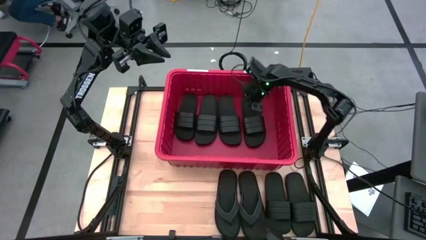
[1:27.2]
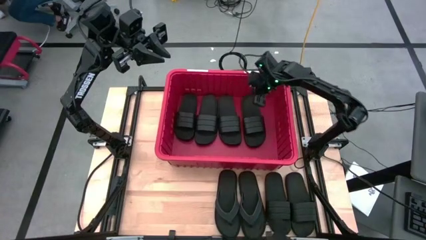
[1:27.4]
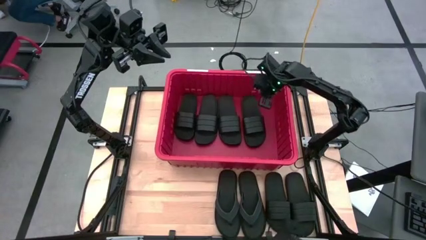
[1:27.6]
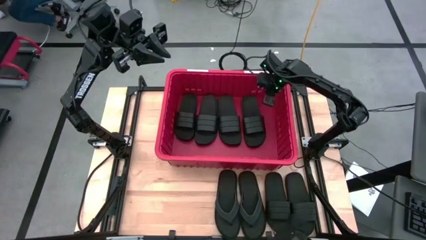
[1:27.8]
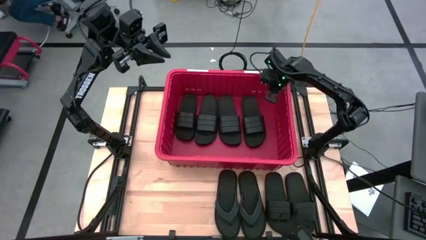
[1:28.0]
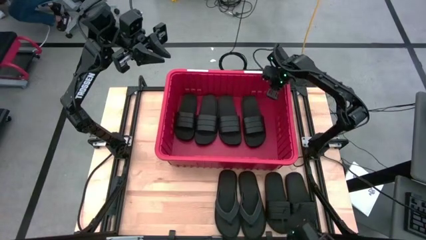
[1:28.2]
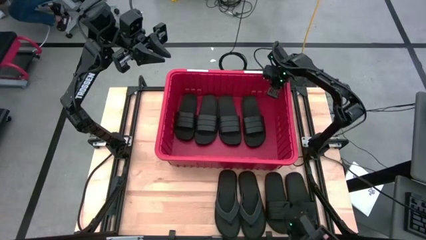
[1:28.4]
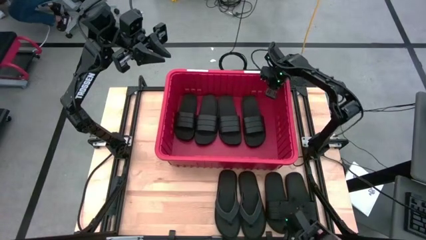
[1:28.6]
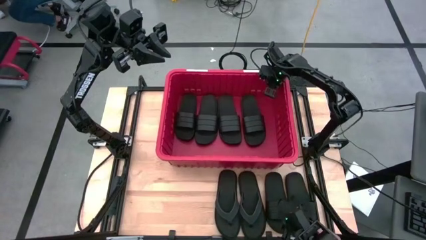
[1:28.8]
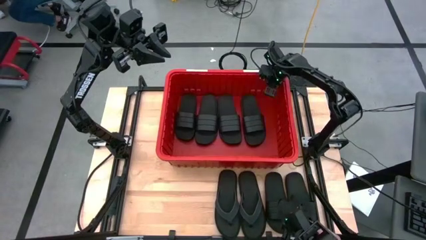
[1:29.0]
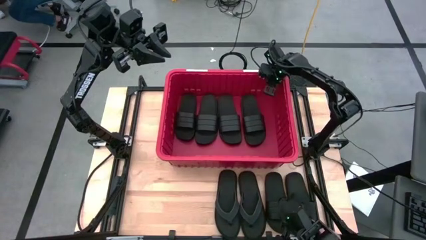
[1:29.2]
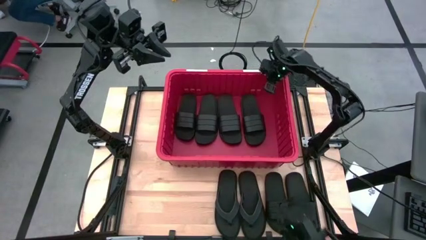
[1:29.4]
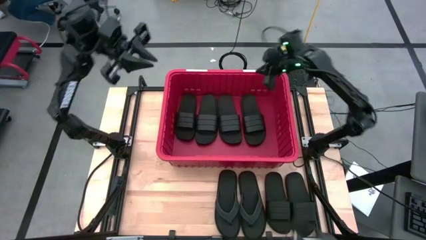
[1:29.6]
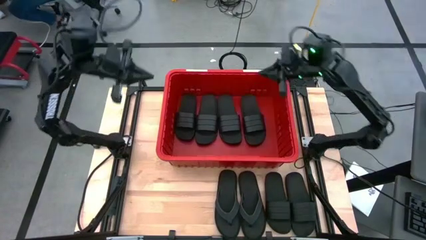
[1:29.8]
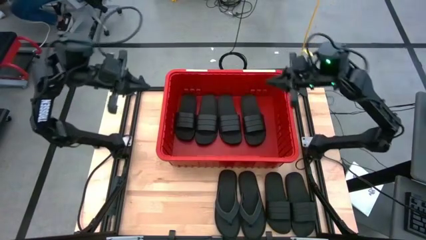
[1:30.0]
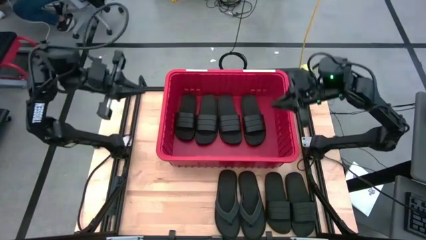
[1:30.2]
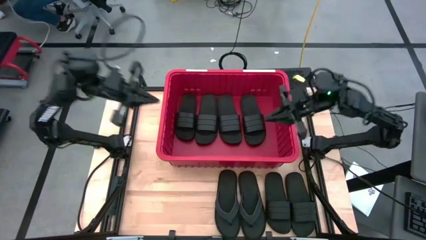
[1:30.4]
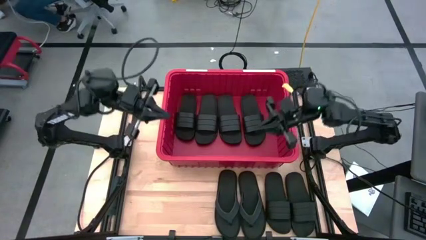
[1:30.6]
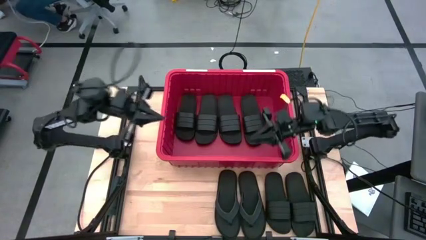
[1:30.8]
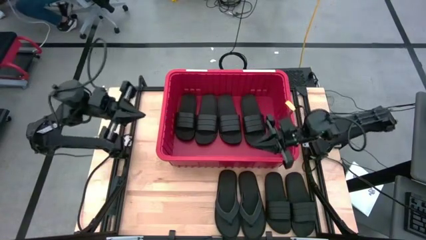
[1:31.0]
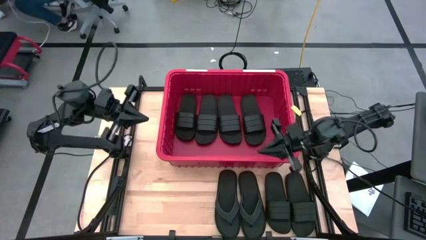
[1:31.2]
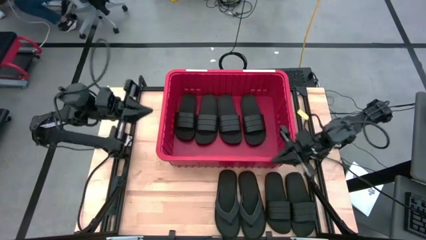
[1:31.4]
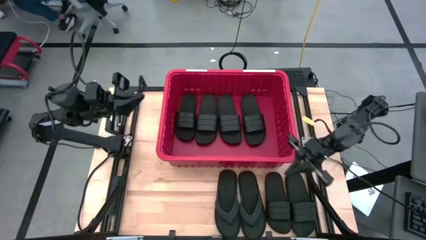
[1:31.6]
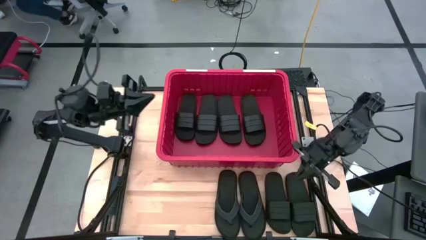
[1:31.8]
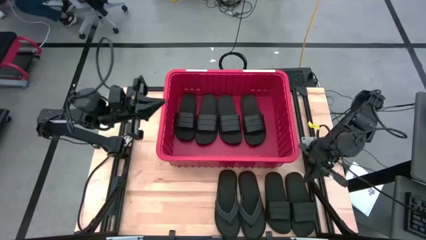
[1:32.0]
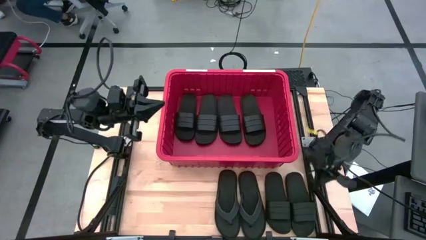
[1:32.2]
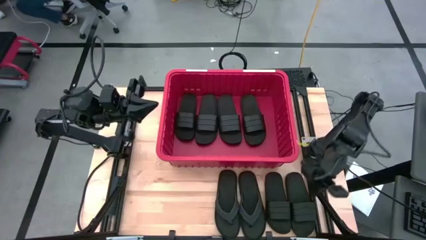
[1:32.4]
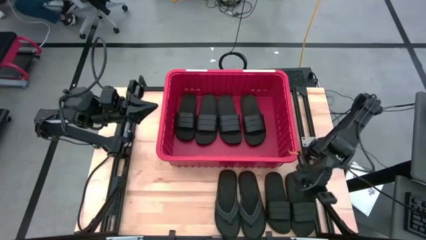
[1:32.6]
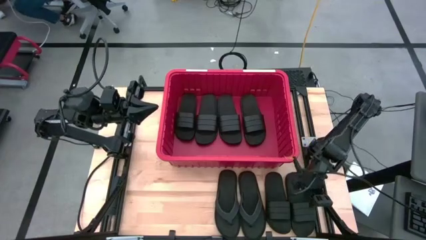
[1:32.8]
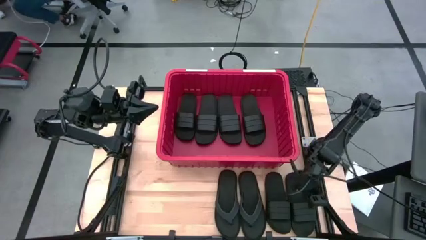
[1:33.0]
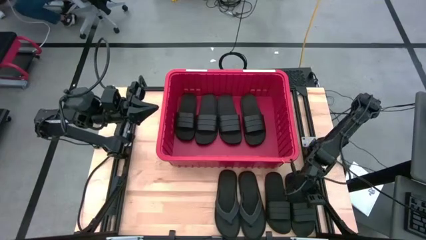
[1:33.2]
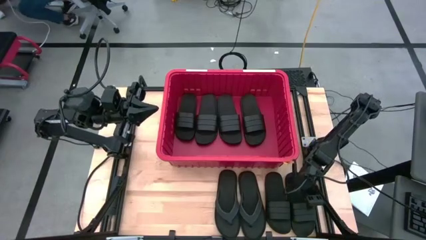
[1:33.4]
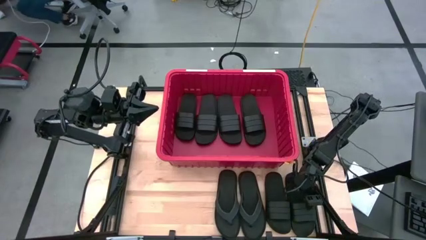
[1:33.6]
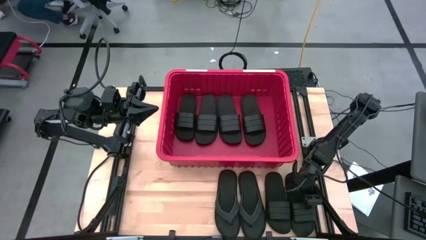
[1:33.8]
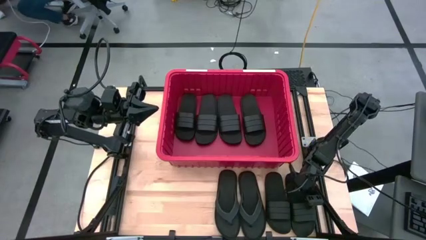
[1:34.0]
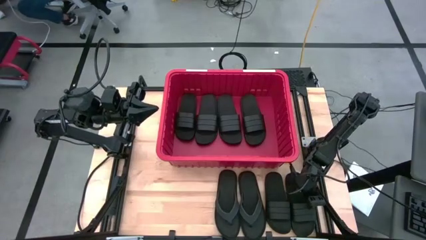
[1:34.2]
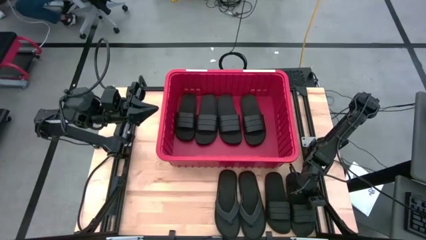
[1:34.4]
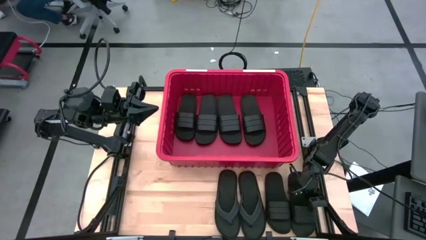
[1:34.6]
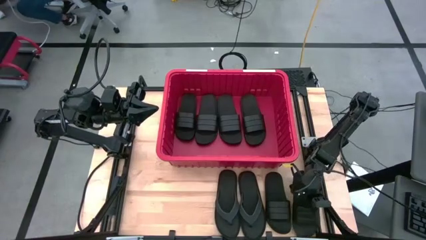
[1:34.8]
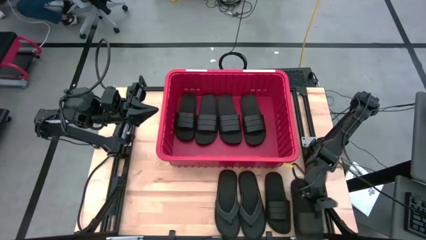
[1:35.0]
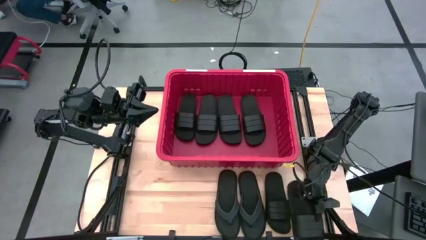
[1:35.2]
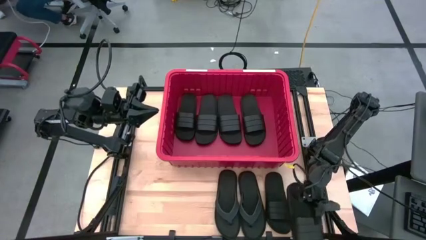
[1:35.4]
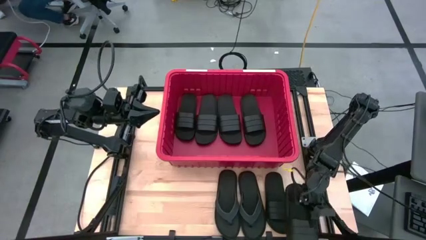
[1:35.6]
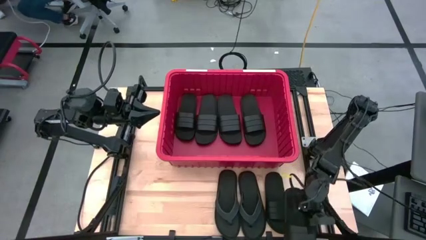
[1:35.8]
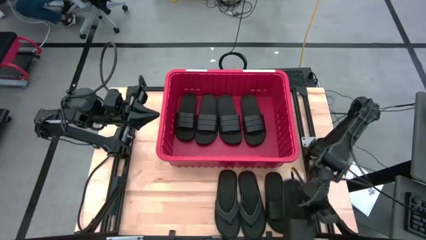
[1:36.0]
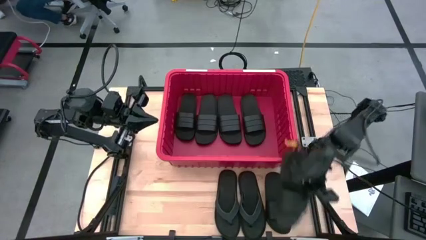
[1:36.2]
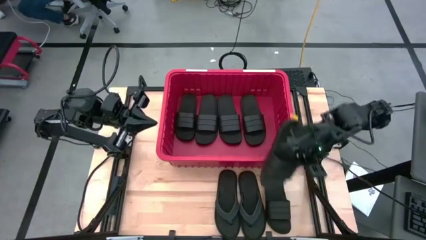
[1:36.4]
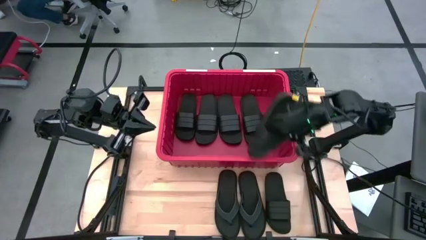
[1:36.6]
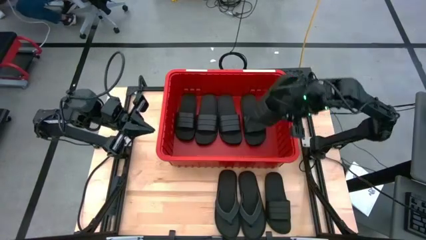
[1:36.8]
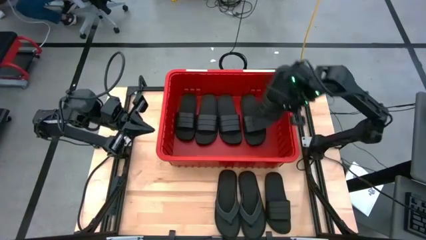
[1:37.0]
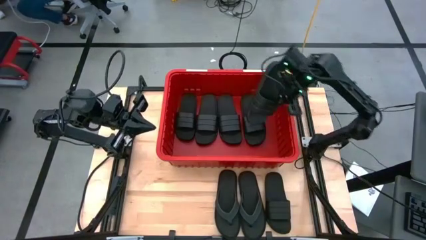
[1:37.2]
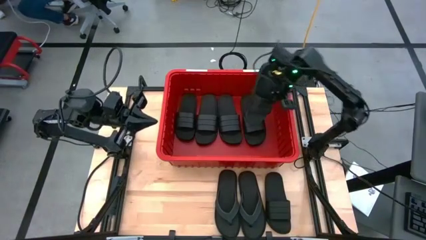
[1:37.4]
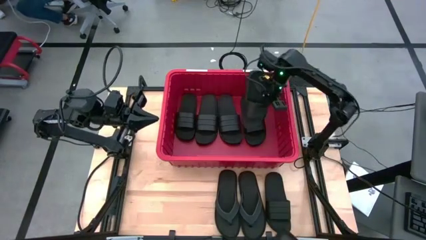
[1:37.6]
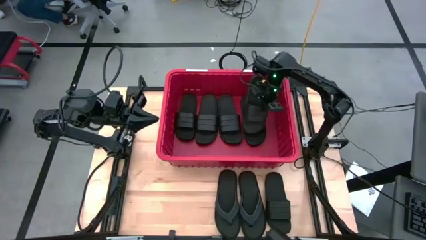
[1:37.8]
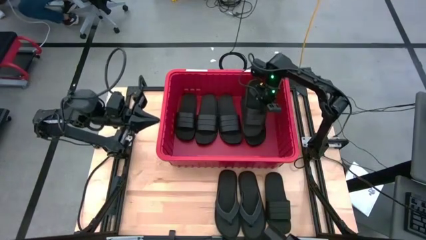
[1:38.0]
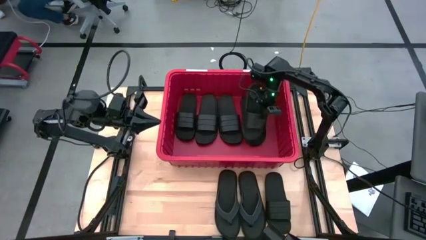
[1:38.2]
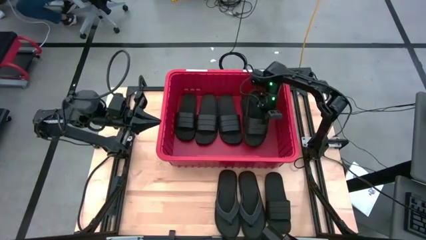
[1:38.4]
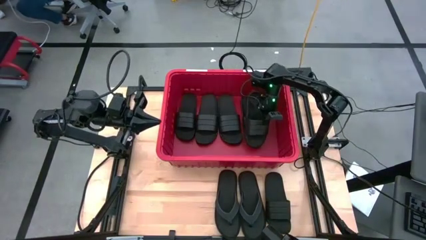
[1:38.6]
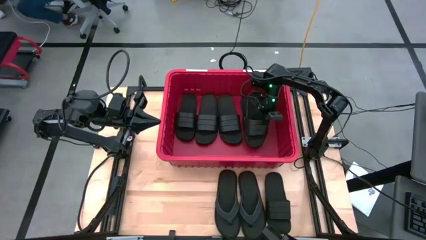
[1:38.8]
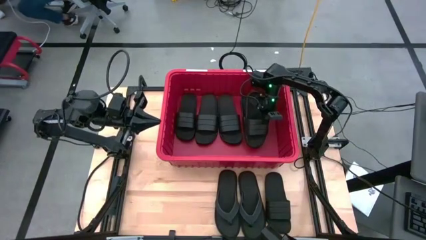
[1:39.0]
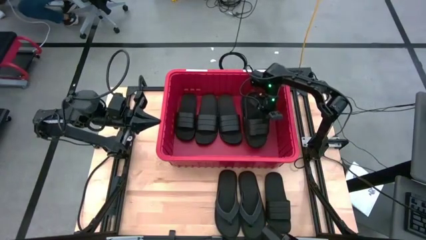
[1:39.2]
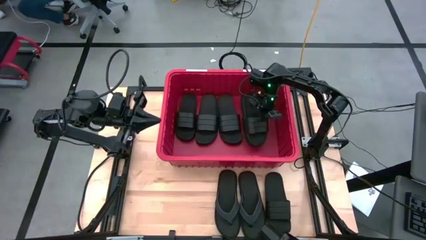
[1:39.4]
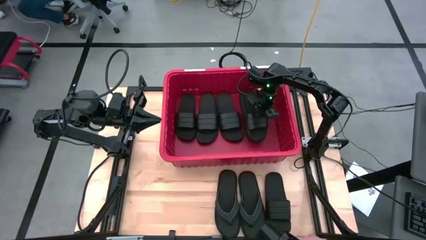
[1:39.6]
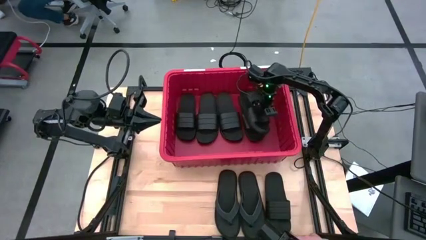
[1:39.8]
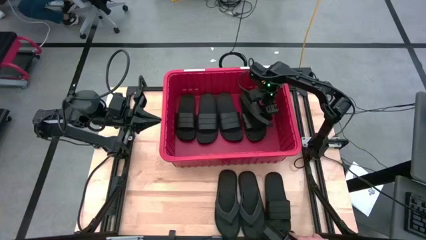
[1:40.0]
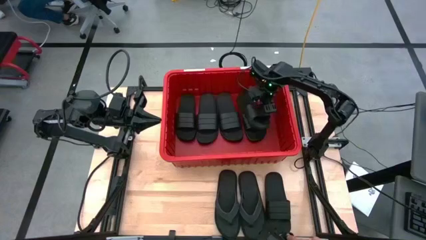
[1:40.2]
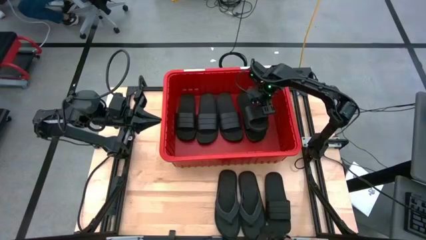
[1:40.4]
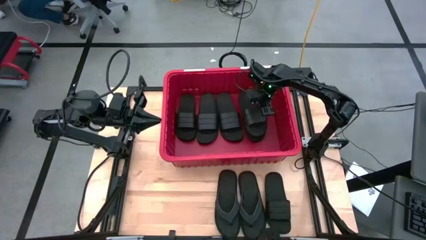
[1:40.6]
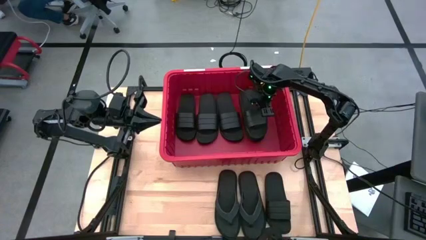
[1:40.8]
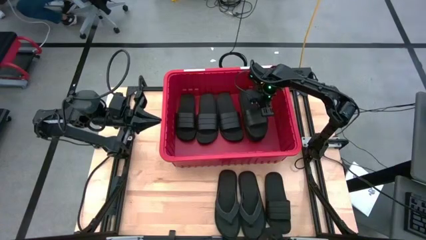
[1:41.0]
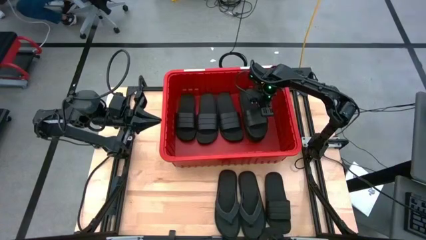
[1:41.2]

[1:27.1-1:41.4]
Task: Pick and place slides into bin
Put the black slides into the red bin
